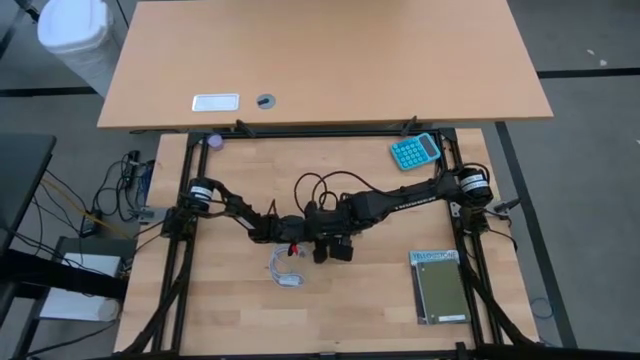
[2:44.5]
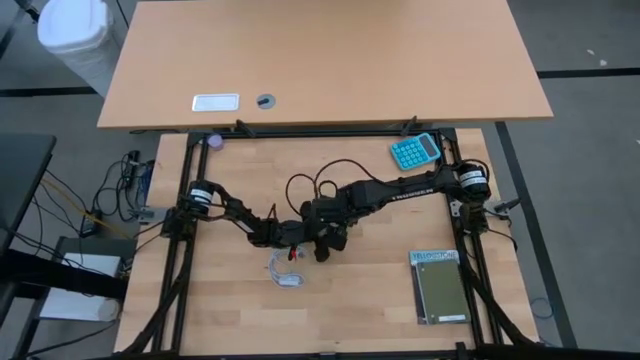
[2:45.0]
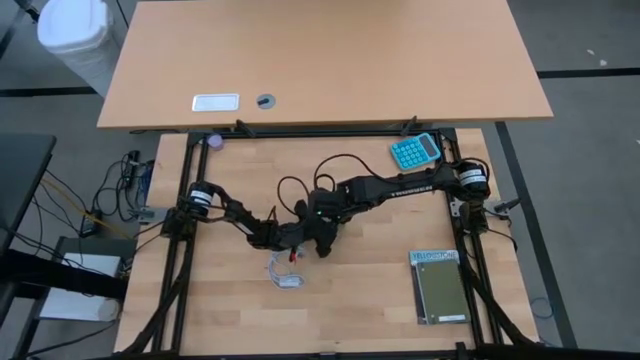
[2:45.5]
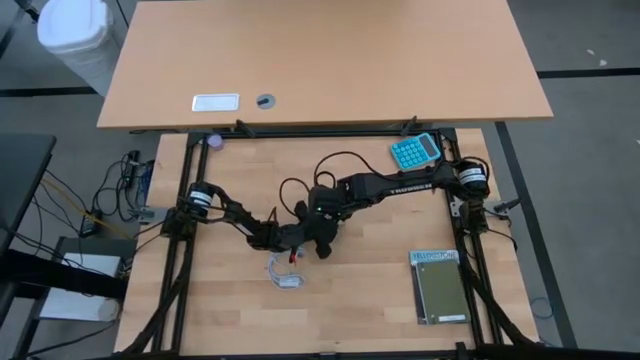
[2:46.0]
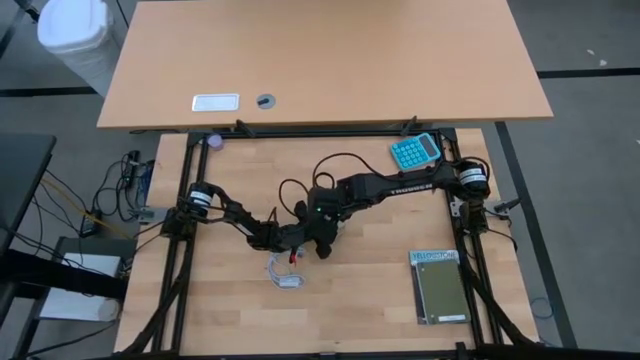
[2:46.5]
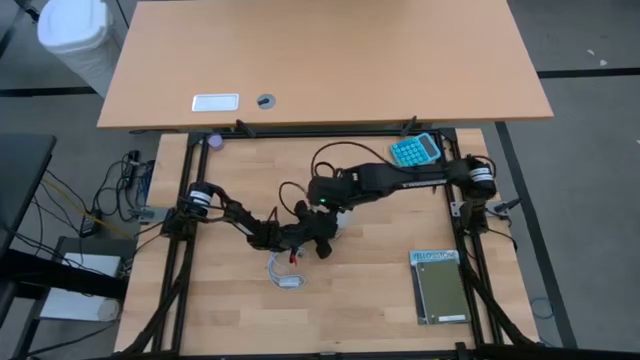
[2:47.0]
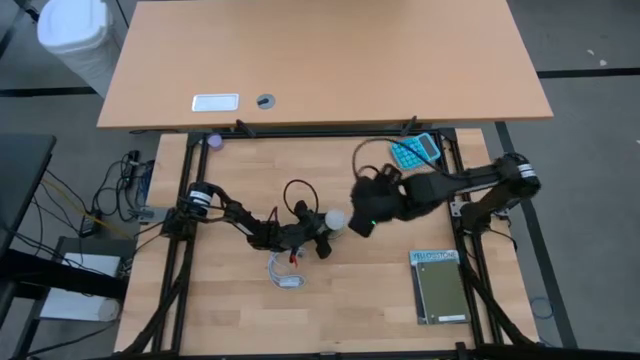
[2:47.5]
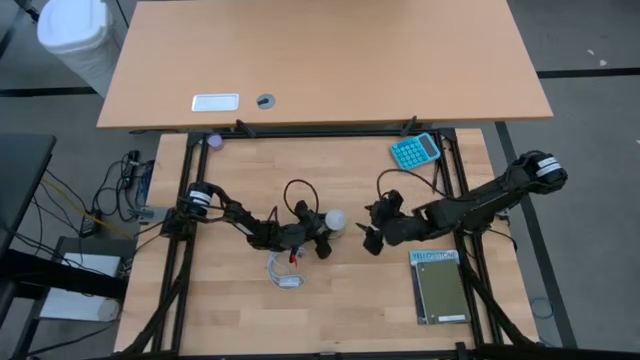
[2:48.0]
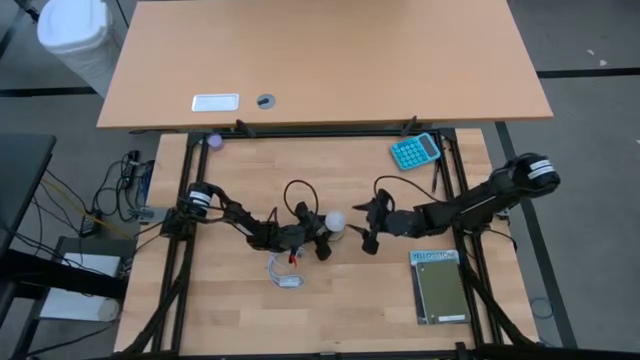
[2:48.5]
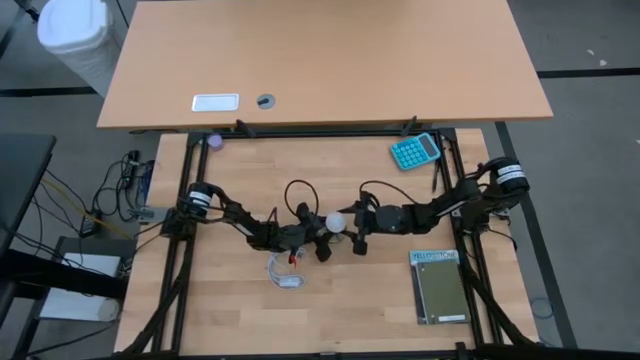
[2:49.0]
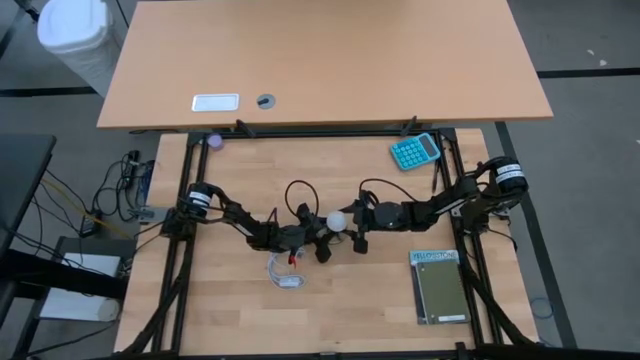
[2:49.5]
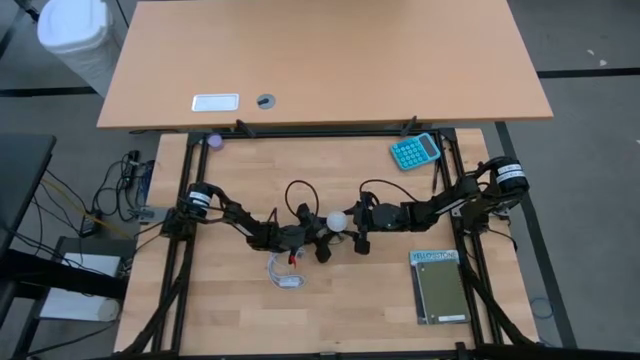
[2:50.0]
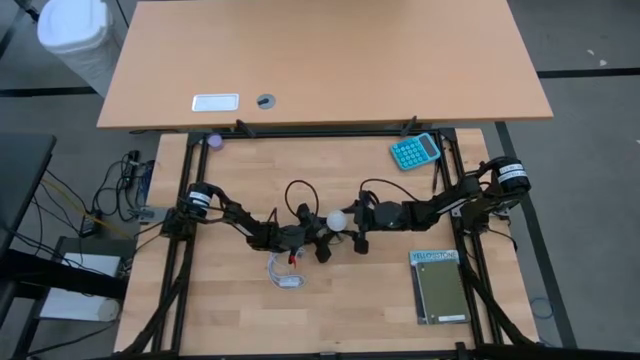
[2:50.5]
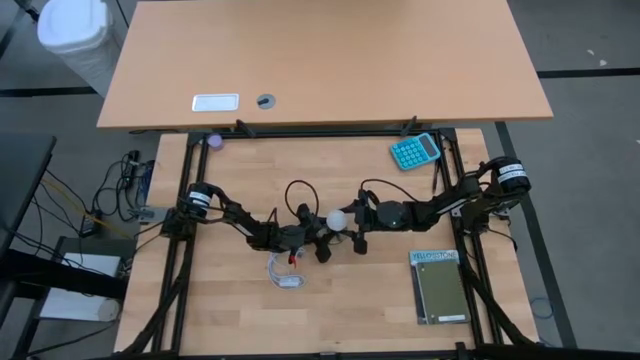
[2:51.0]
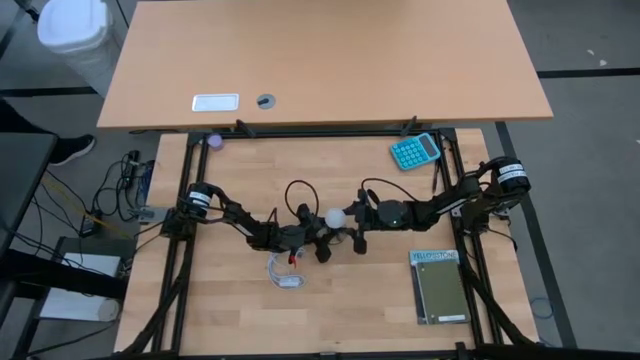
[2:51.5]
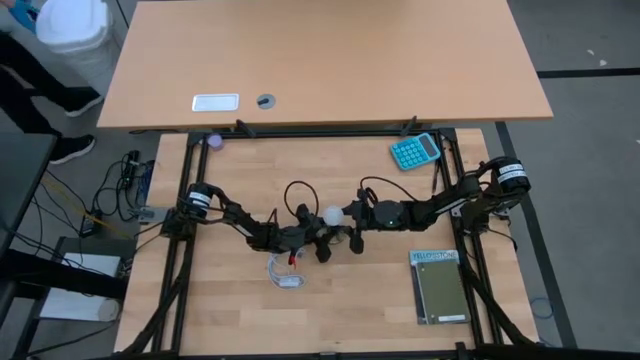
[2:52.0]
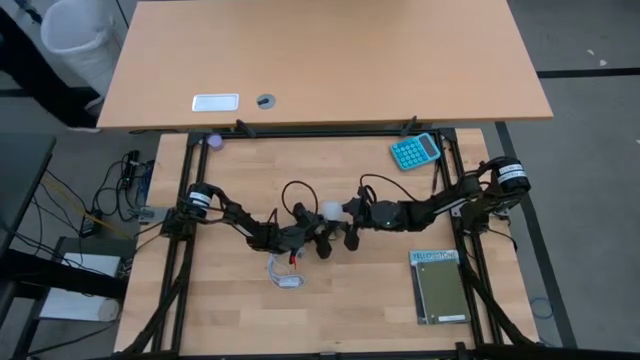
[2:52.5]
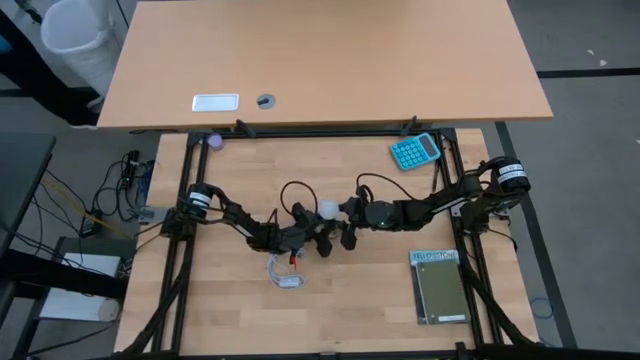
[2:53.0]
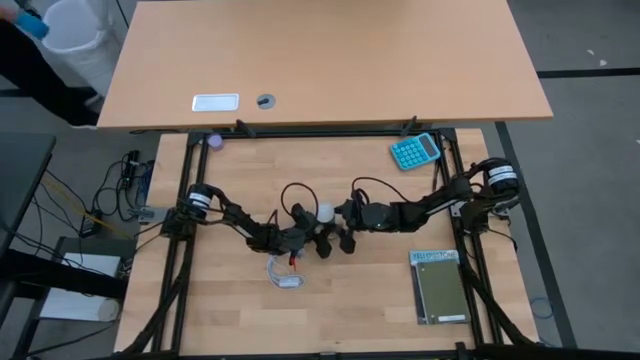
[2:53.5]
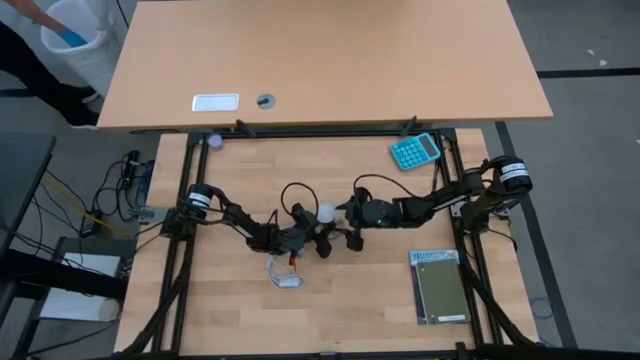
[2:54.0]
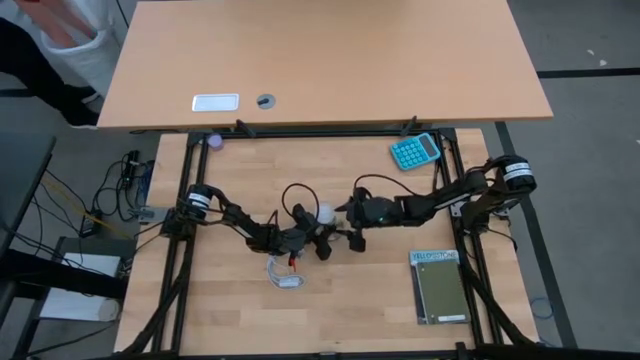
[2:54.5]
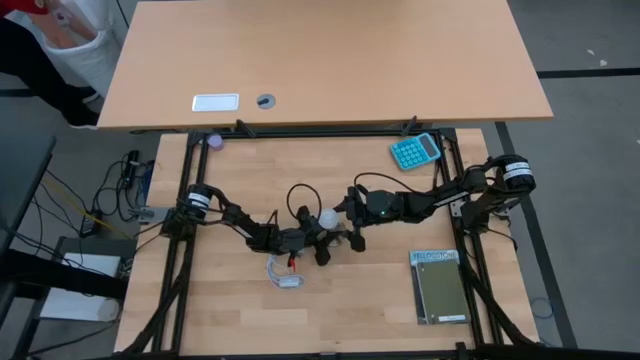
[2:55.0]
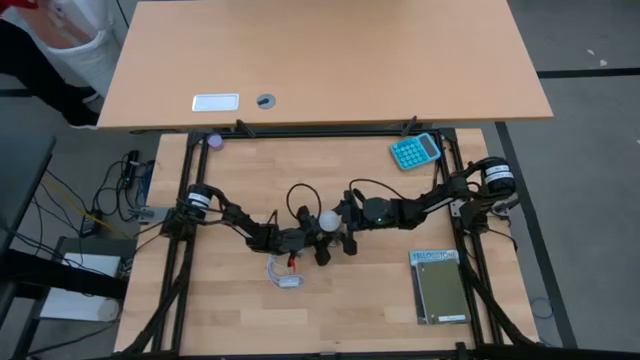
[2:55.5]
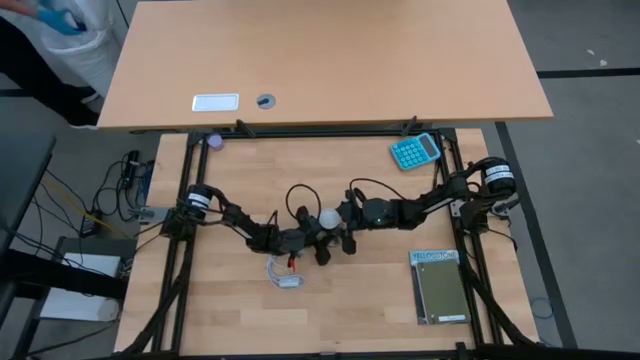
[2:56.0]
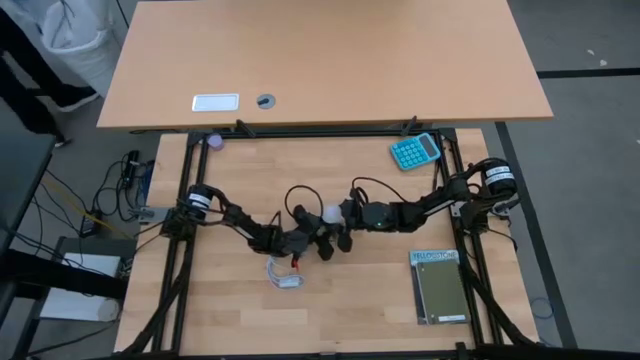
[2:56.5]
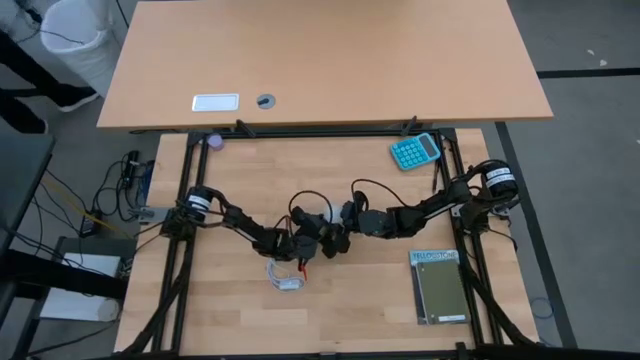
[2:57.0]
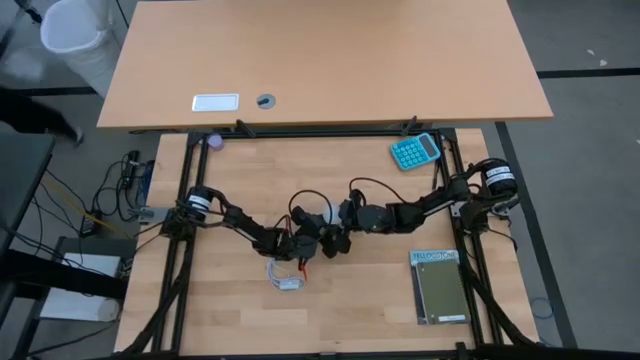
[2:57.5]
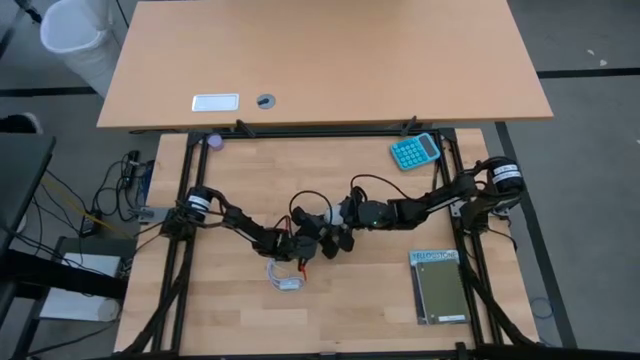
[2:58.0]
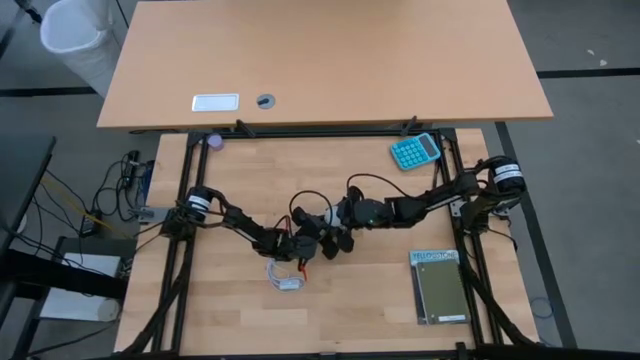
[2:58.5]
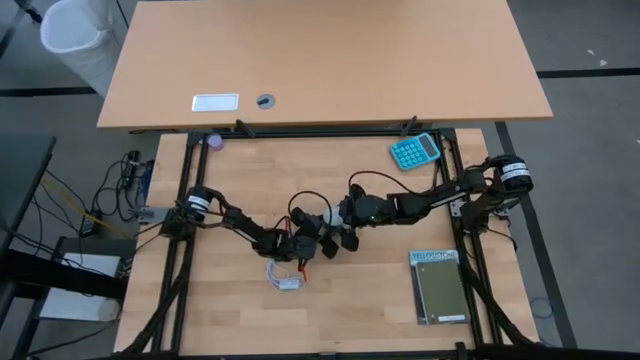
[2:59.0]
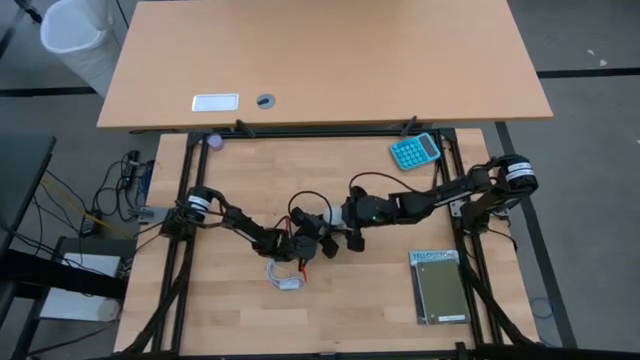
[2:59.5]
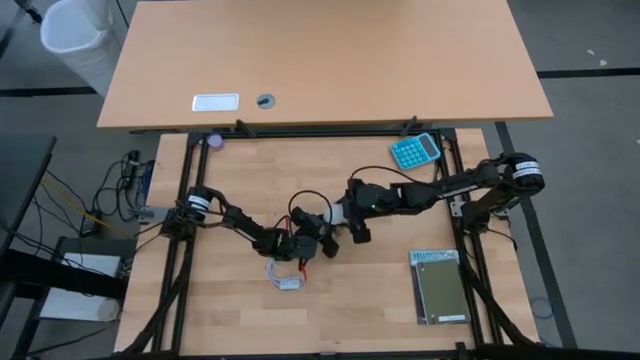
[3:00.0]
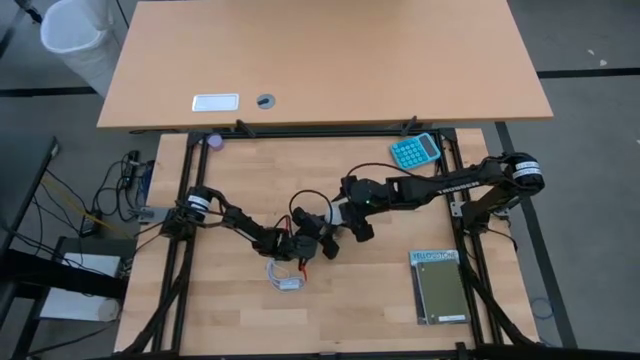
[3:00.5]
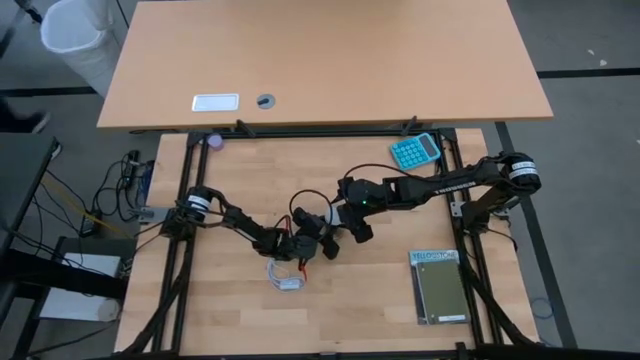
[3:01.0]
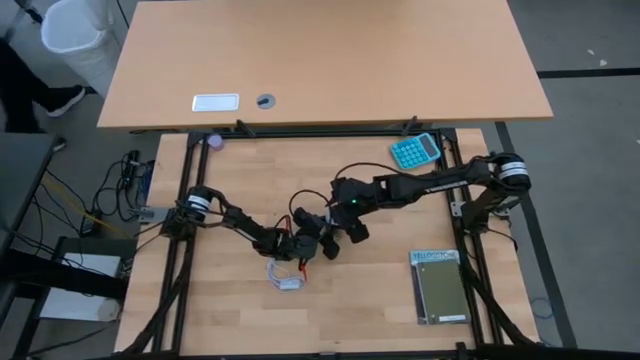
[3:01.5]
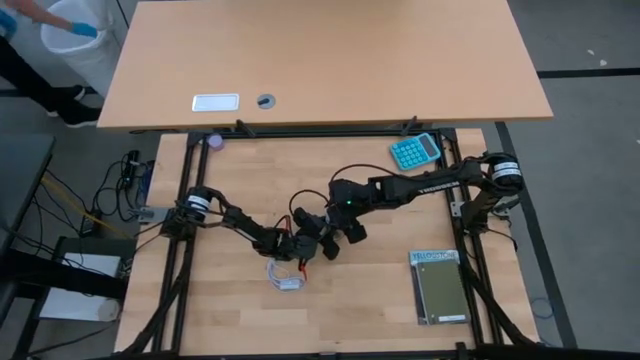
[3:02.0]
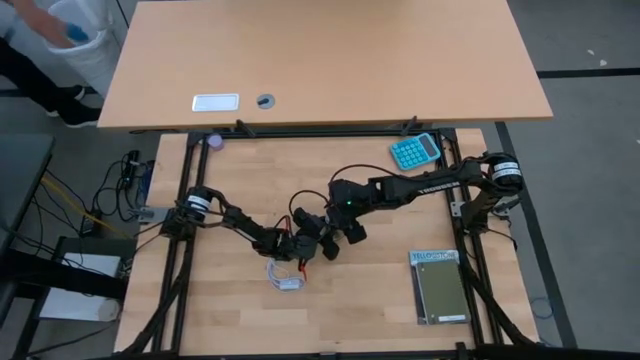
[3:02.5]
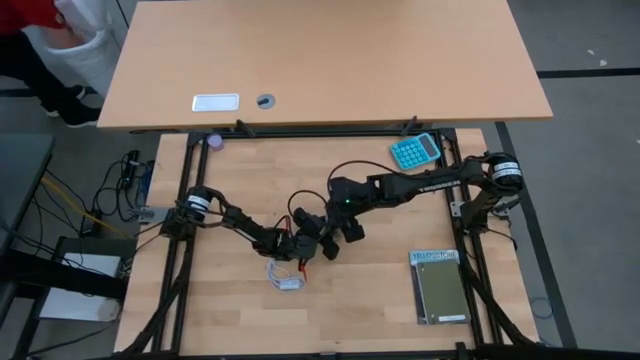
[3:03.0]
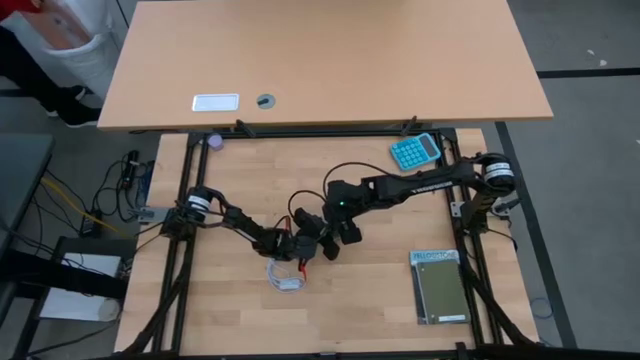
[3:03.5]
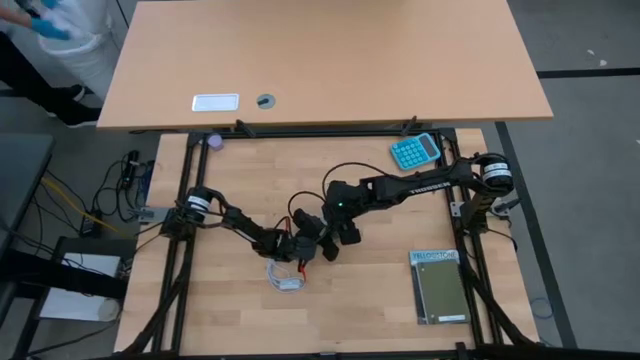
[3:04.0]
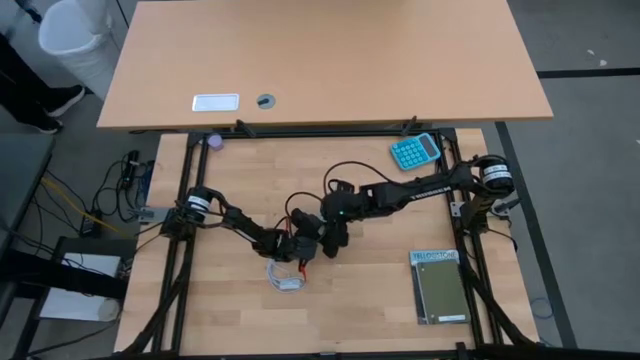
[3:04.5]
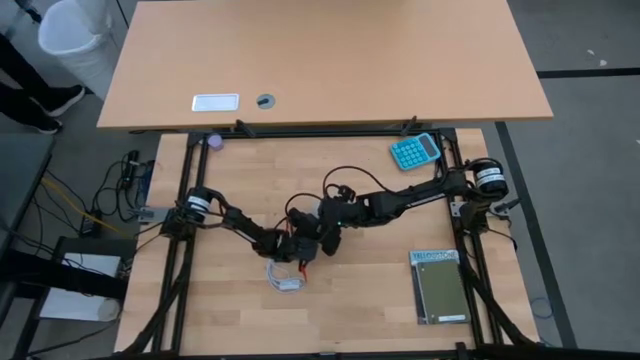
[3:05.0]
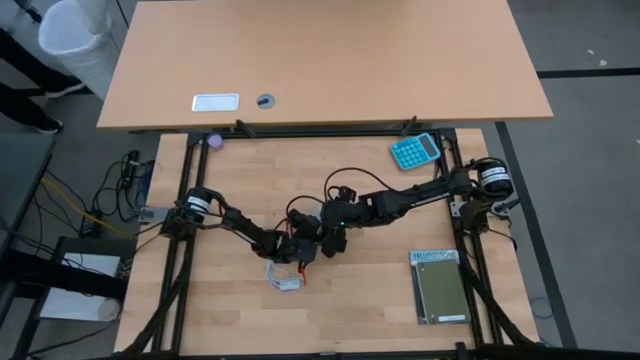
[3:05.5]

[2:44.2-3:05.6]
Task: Screw lightbulb
Insert the lightbulb into the socket
